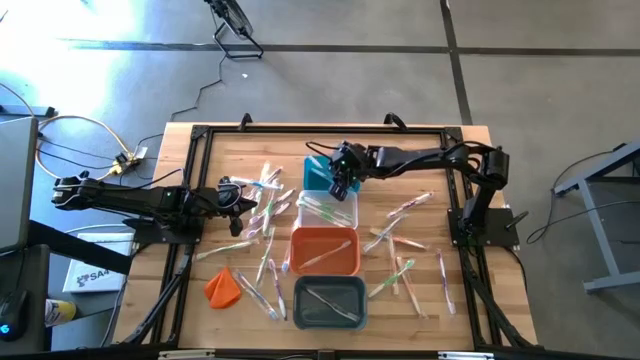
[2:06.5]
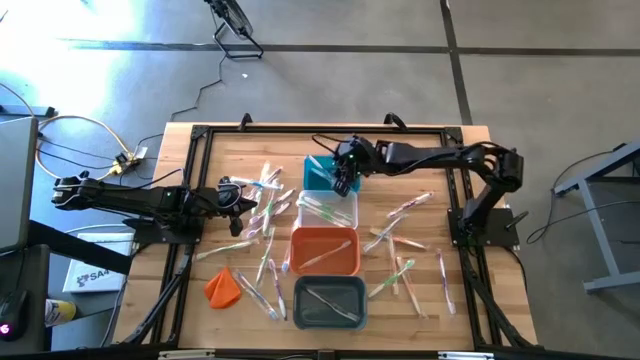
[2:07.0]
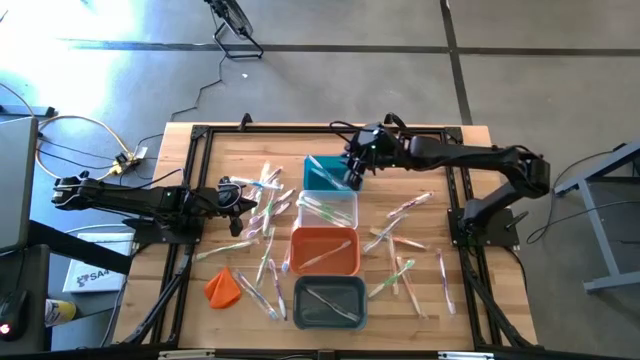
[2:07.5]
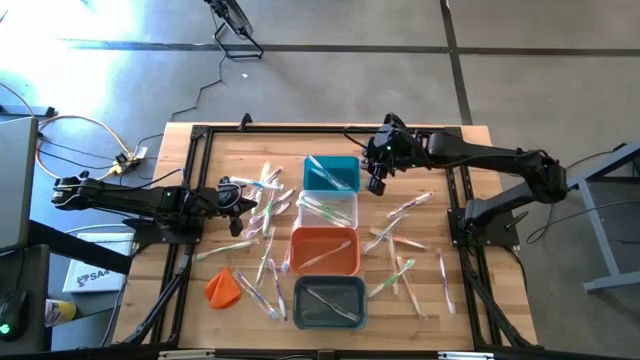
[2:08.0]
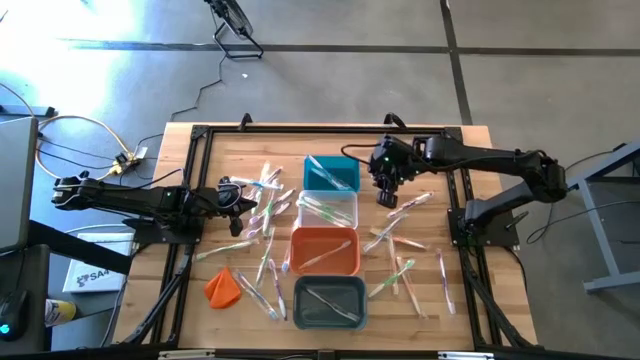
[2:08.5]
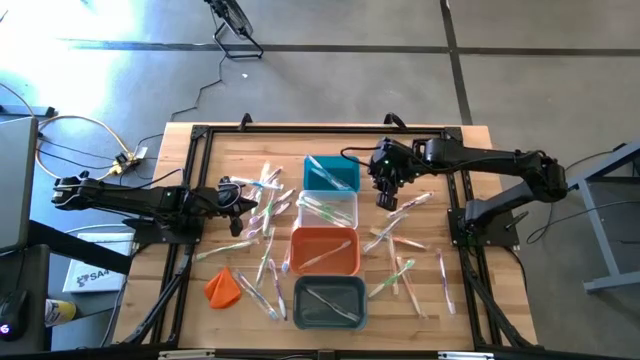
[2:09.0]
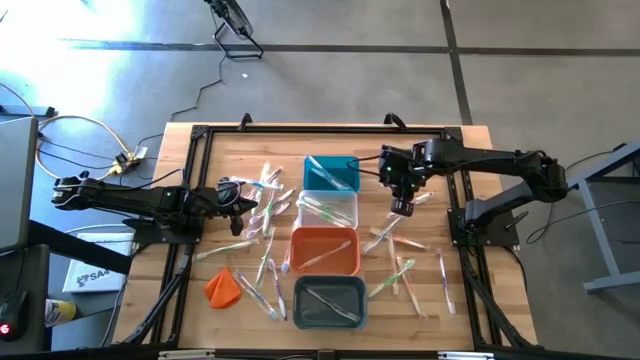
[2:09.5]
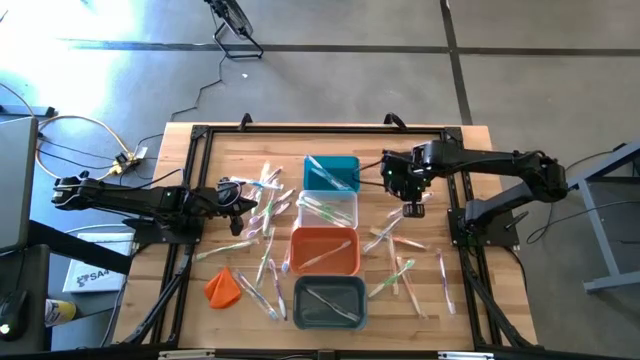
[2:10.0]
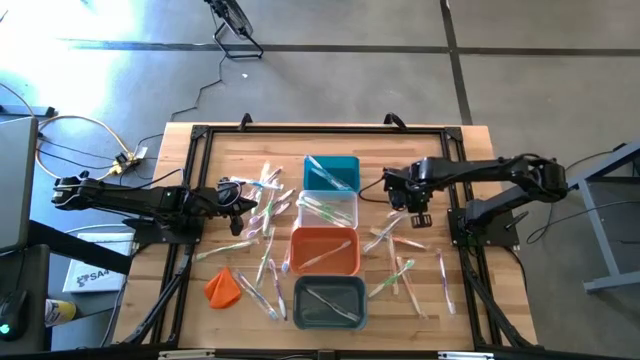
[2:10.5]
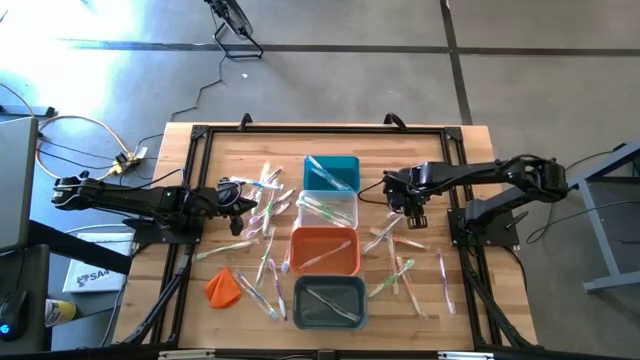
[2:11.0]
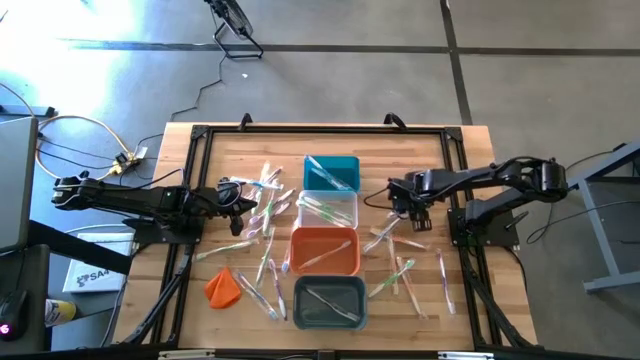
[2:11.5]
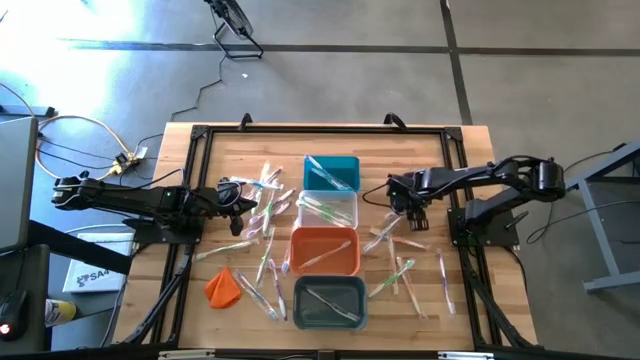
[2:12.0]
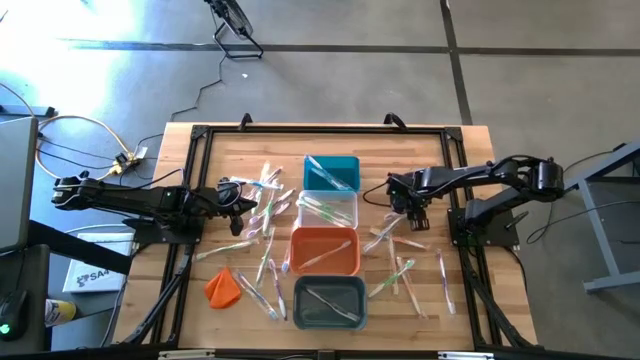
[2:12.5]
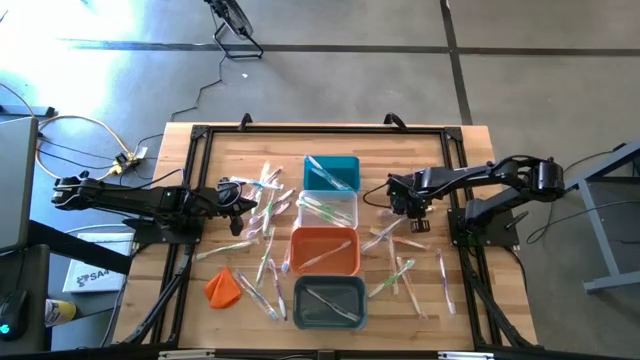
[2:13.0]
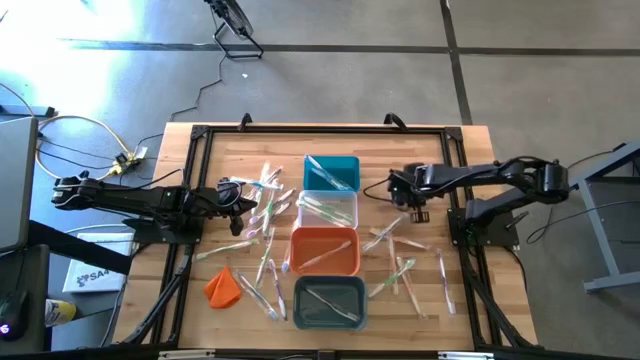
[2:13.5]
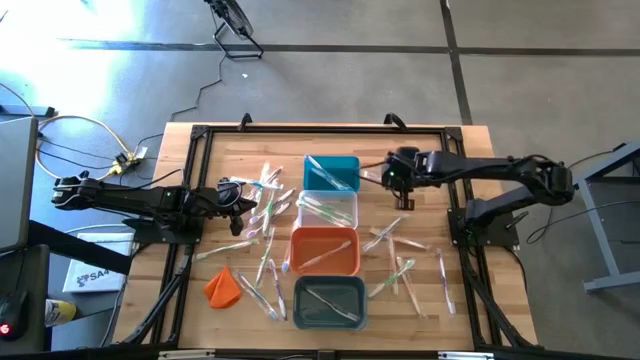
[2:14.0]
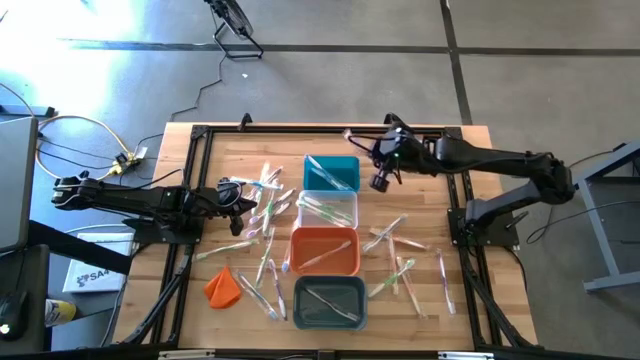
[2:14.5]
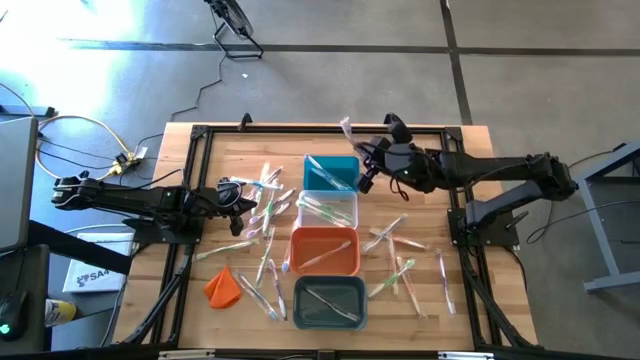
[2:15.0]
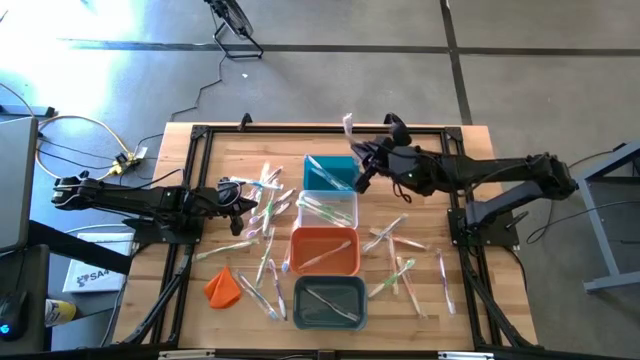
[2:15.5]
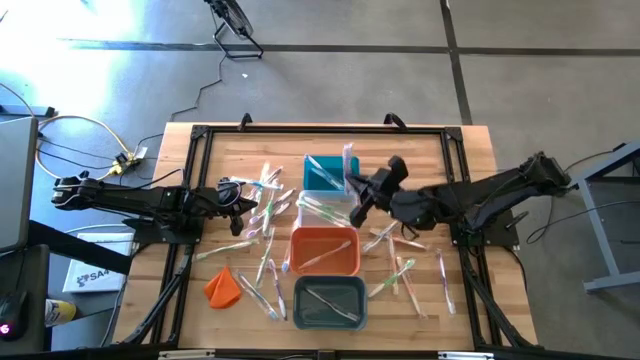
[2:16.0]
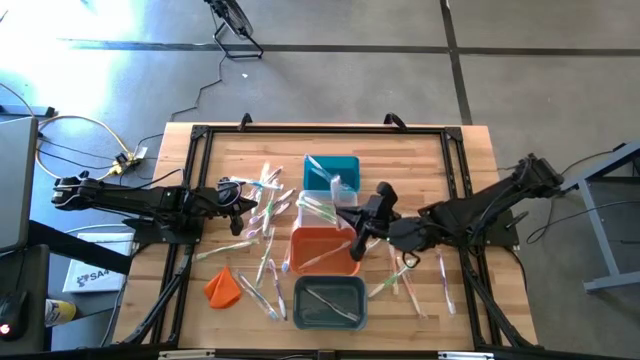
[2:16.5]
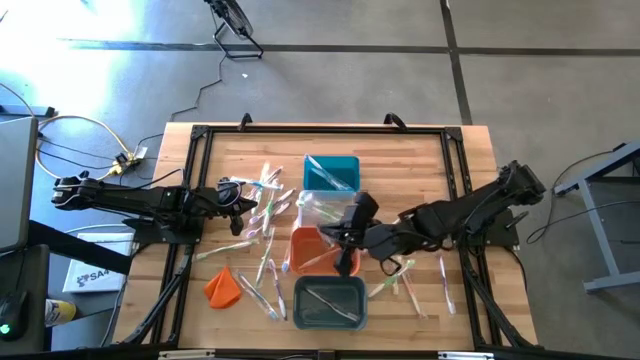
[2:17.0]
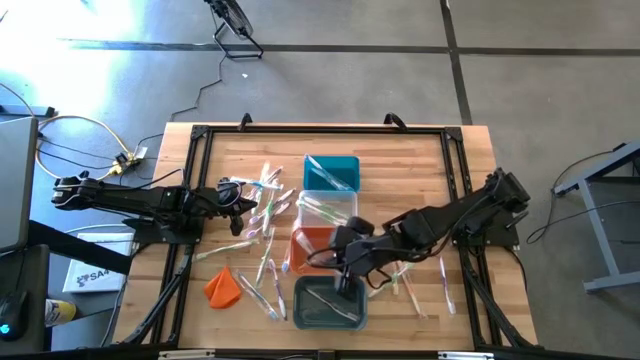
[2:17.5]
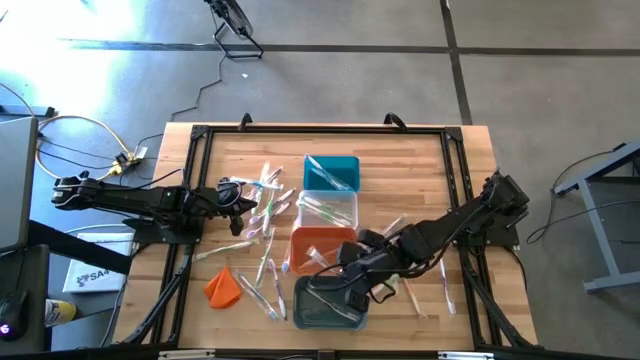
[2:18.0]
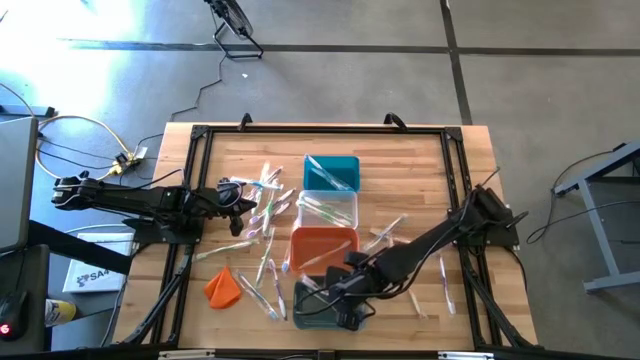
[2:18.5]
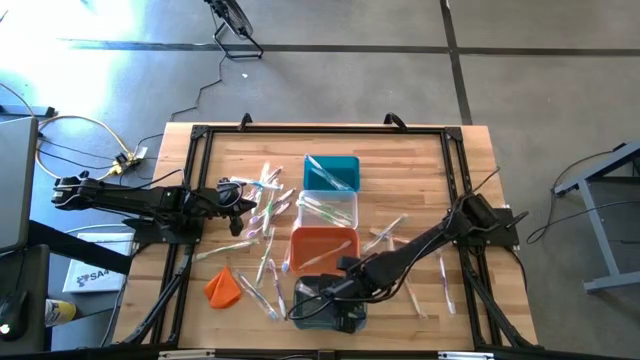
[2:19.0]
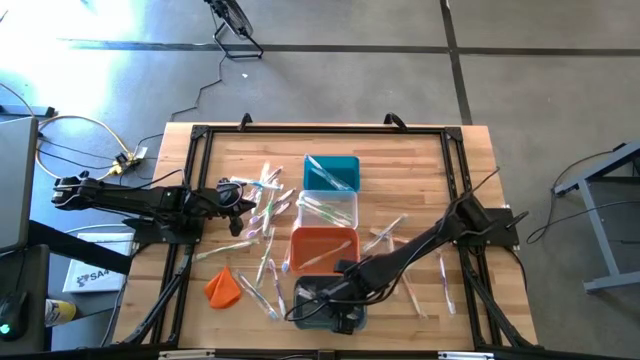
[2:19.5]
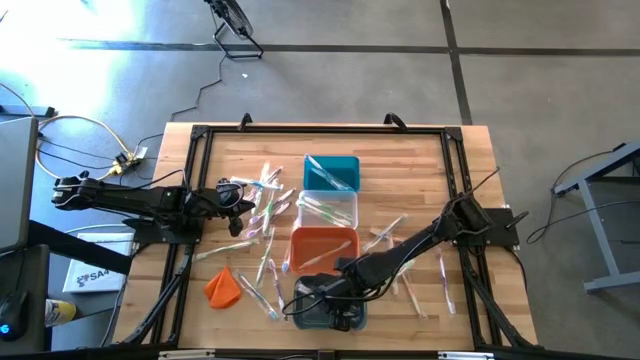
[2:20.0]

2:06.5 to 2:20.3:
Task: Pick & Place Toothbrushes
Put the violet toothbrush into the green bin

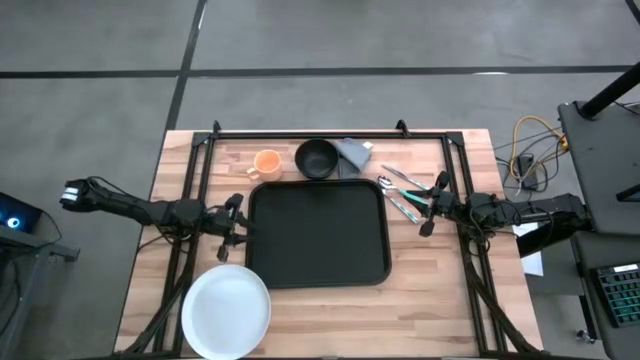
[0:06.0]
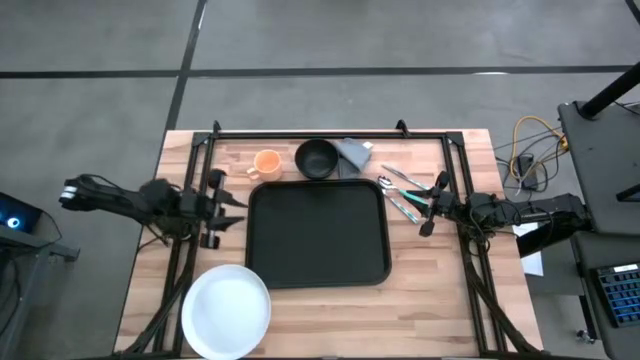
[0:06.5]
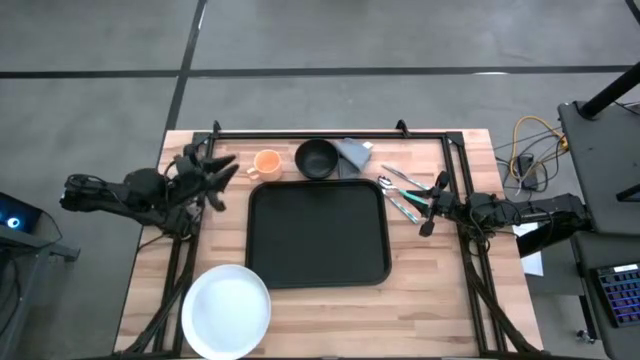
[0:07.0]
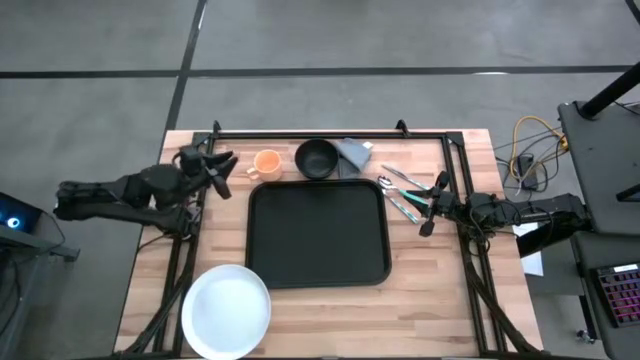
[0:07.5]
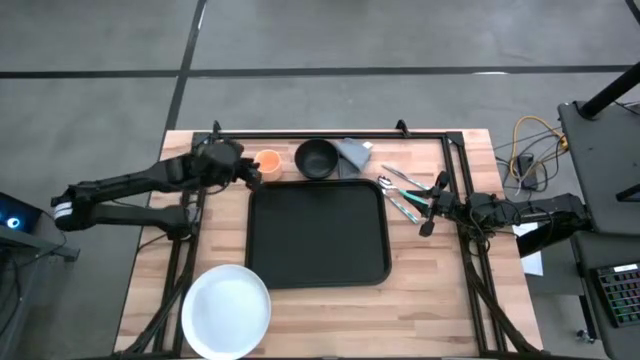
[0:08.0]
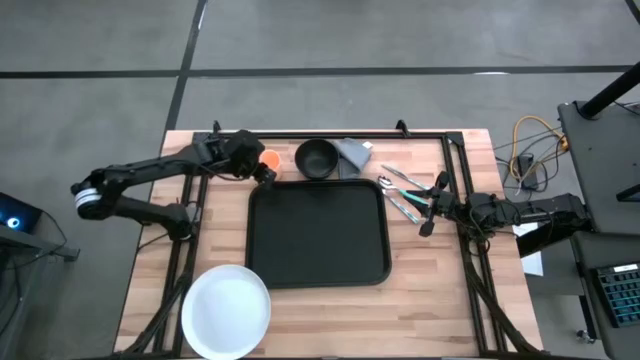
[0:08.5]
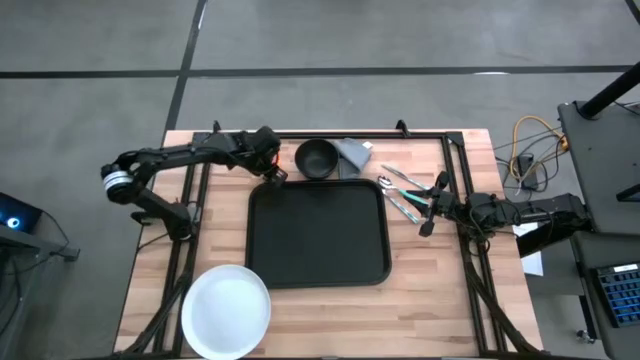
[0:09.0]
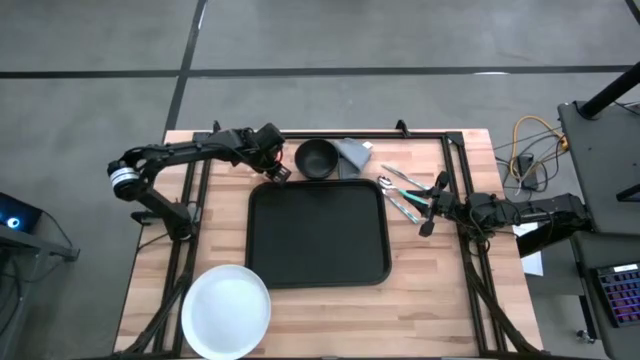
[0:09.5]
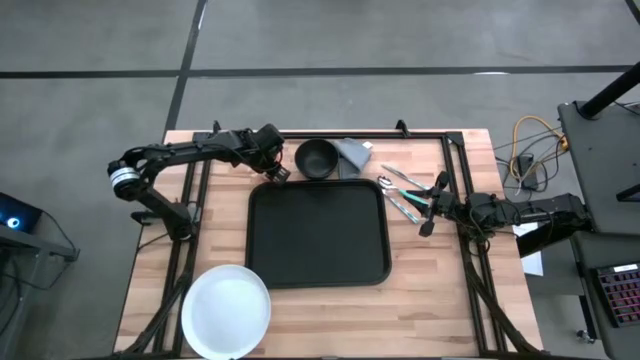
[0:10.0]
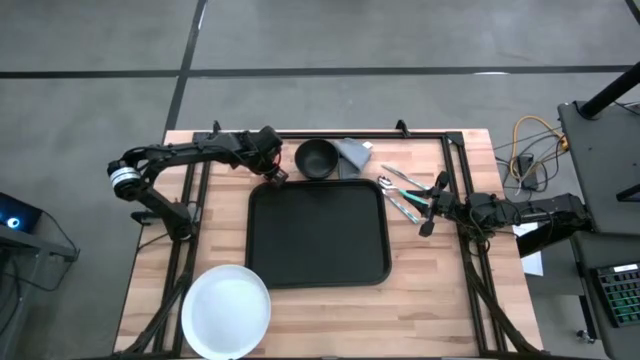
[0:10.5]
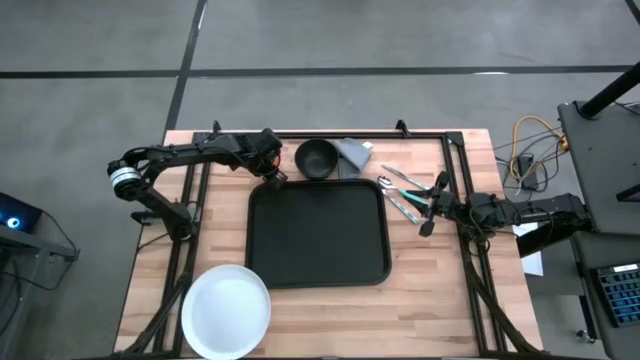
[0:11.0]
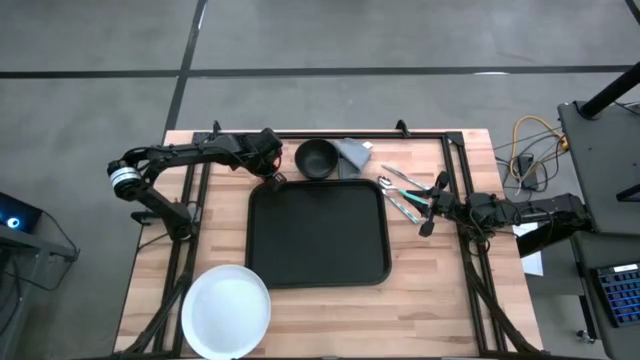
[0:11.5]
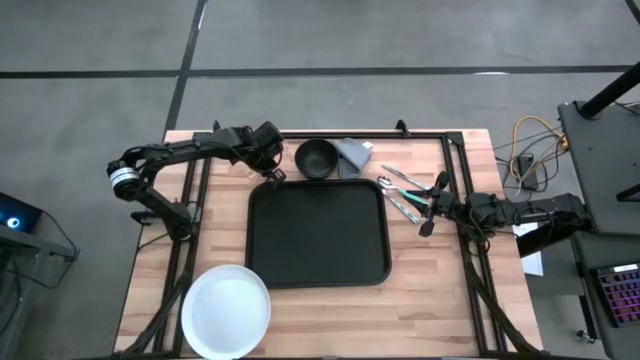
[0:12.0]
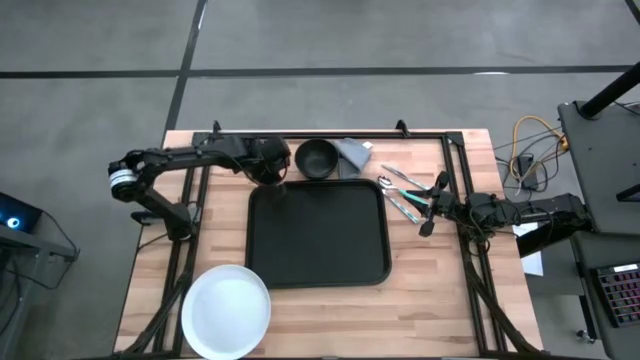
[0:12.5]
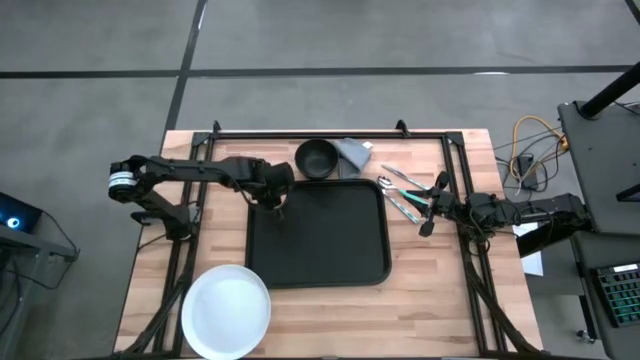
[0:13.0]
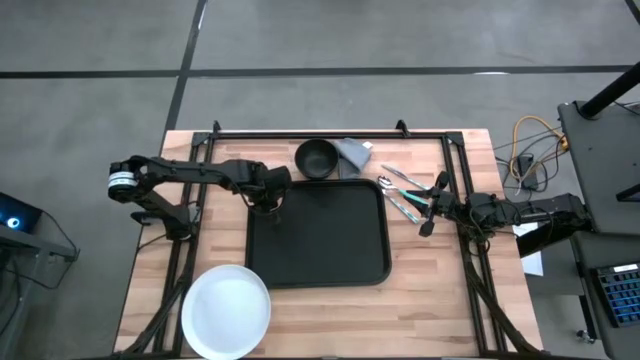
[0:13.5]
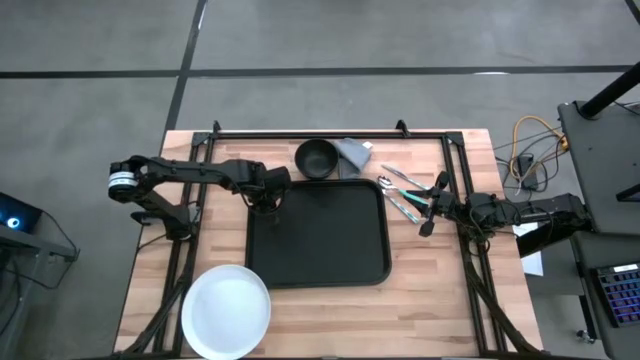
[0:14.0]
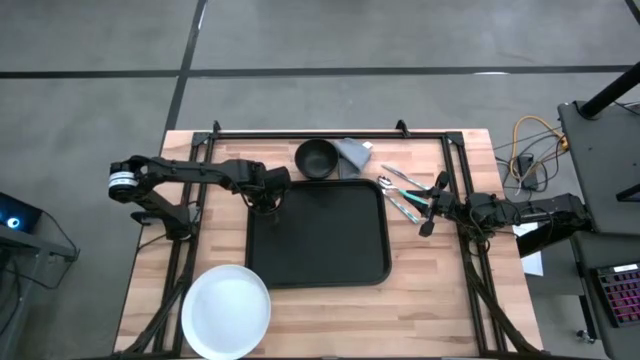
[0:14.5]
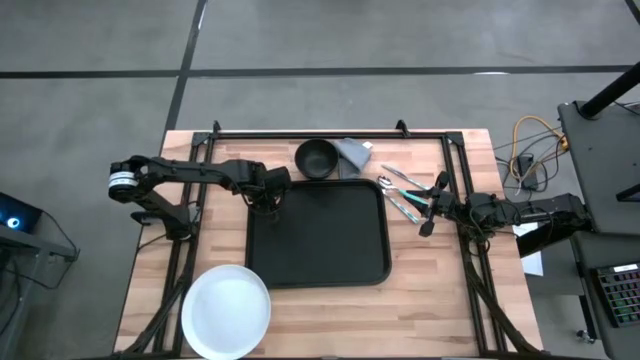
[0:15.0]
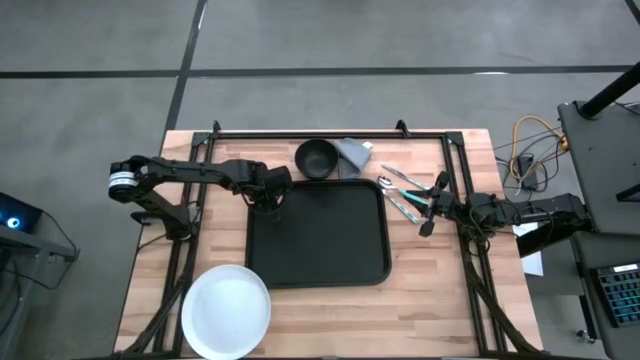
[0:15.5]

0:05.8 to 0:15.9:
Task: Set up tray
Put the pink cup on top of the black serving tray
